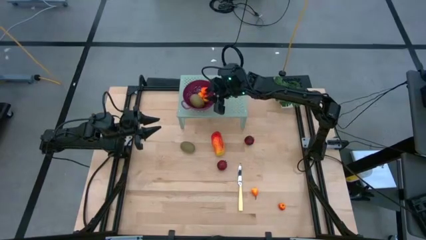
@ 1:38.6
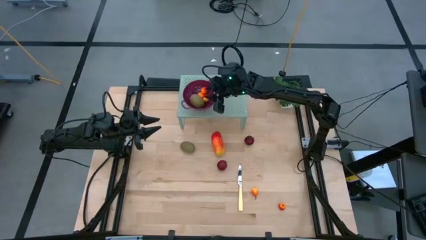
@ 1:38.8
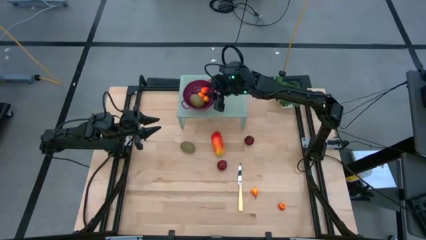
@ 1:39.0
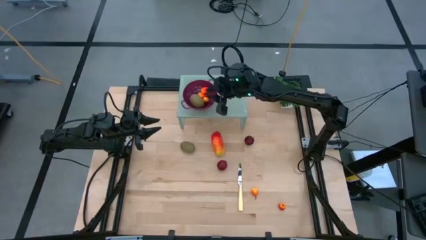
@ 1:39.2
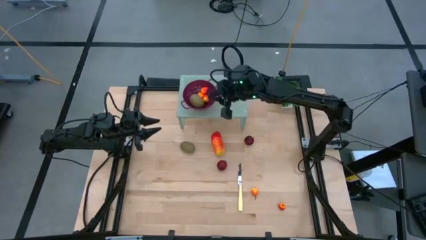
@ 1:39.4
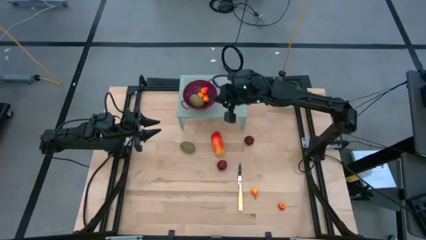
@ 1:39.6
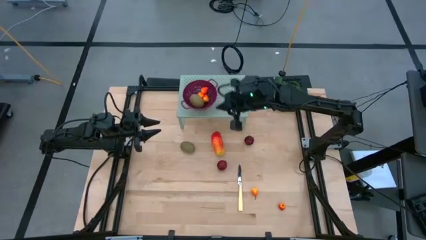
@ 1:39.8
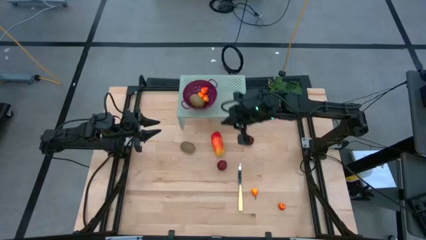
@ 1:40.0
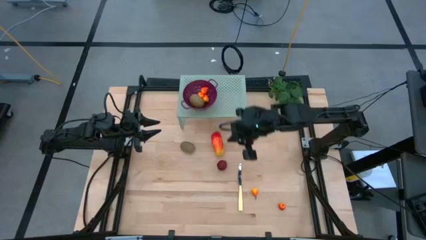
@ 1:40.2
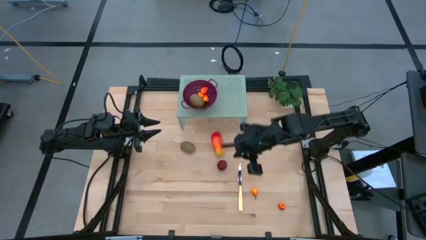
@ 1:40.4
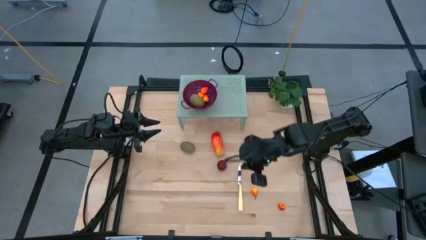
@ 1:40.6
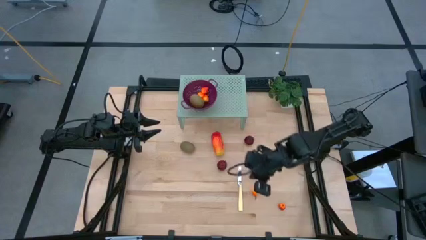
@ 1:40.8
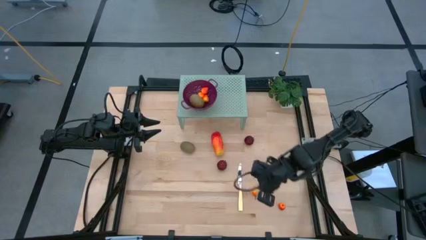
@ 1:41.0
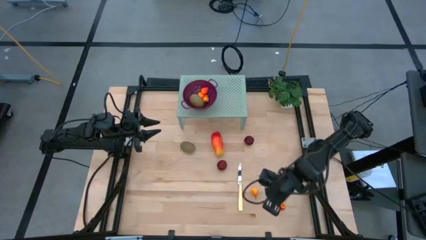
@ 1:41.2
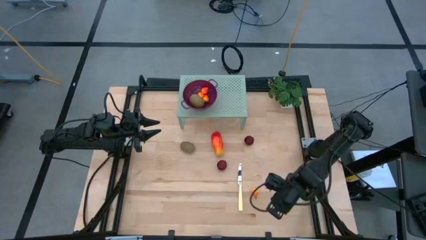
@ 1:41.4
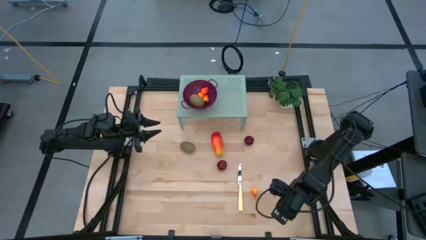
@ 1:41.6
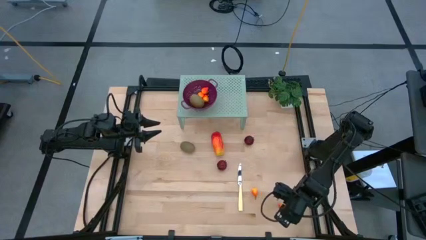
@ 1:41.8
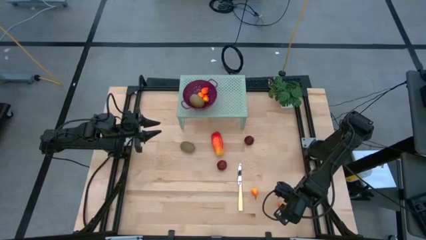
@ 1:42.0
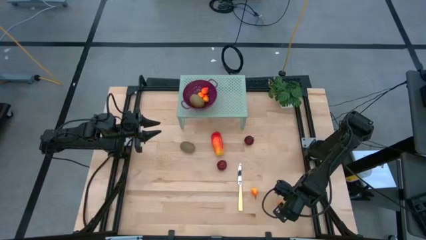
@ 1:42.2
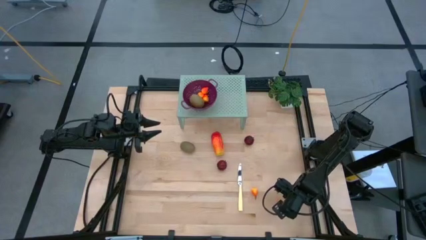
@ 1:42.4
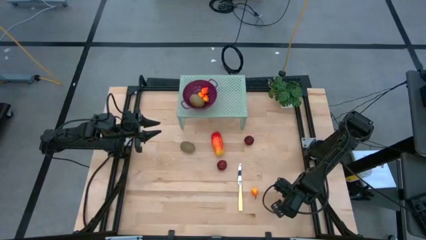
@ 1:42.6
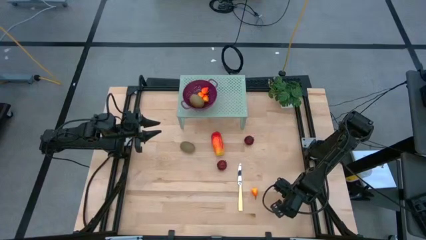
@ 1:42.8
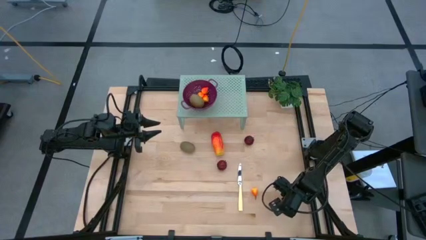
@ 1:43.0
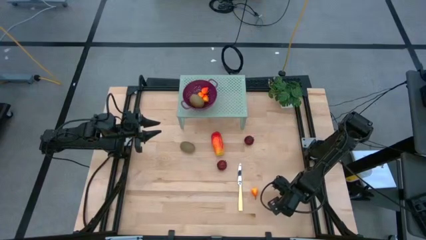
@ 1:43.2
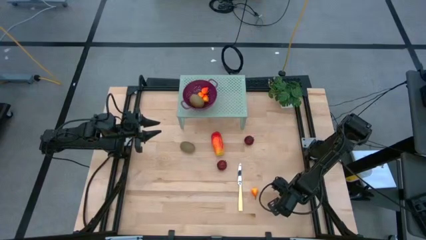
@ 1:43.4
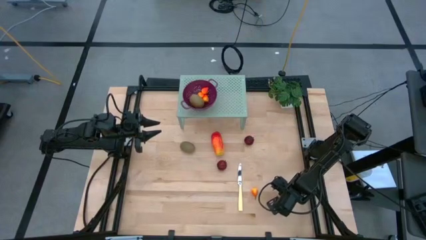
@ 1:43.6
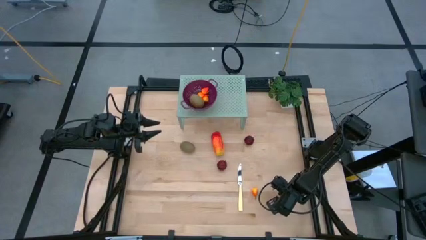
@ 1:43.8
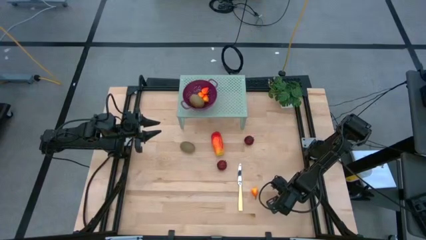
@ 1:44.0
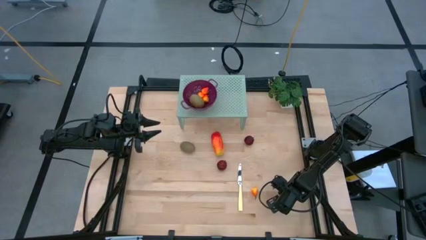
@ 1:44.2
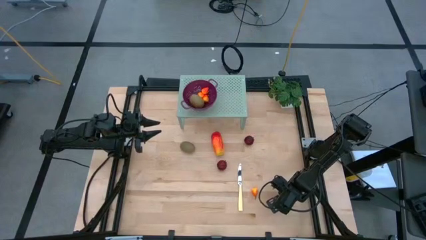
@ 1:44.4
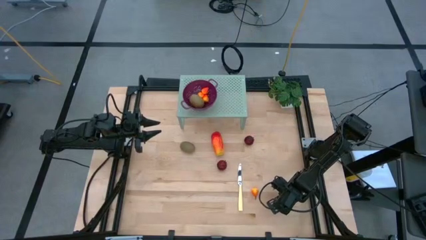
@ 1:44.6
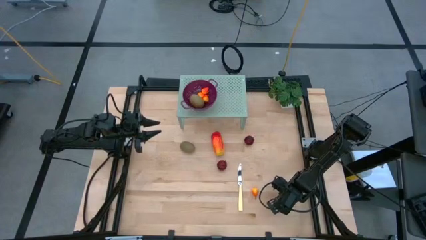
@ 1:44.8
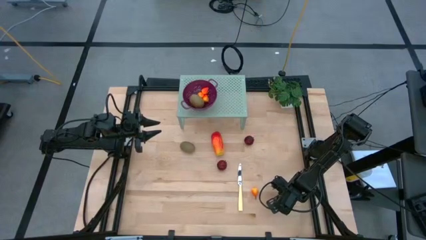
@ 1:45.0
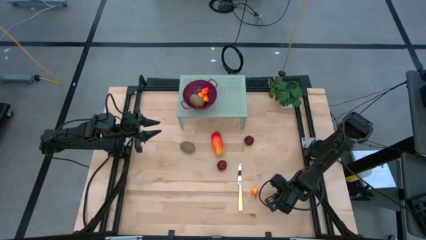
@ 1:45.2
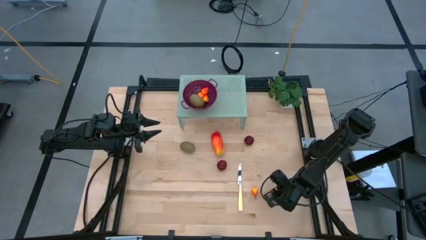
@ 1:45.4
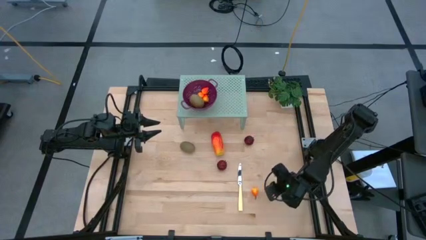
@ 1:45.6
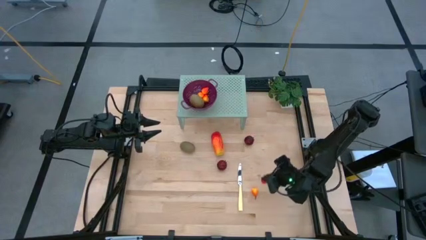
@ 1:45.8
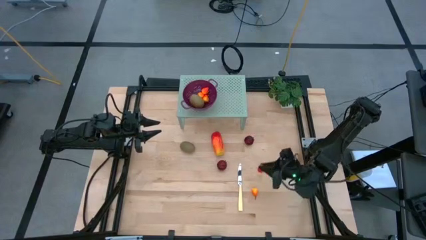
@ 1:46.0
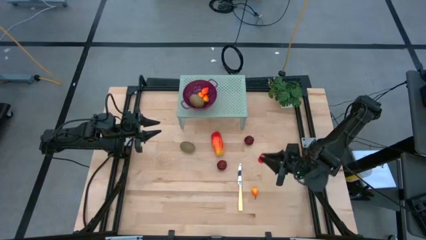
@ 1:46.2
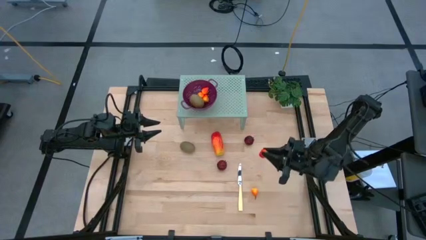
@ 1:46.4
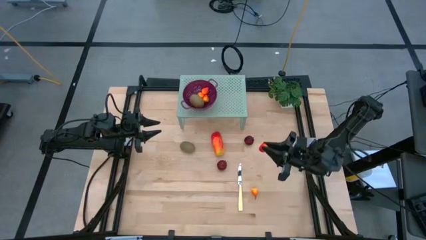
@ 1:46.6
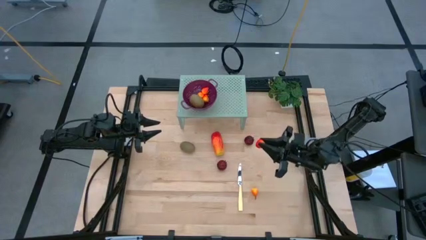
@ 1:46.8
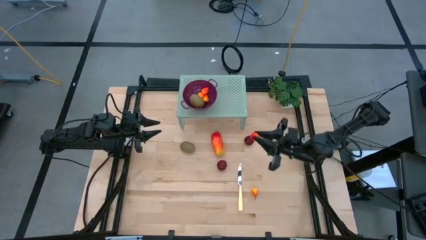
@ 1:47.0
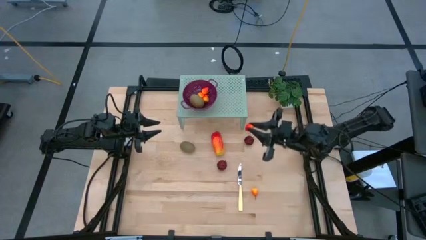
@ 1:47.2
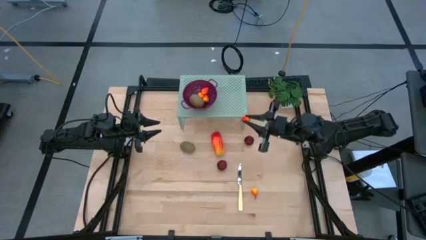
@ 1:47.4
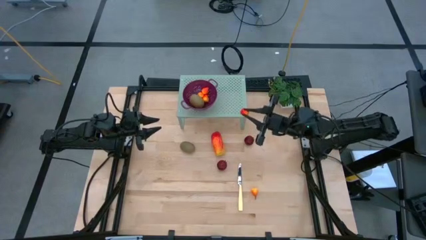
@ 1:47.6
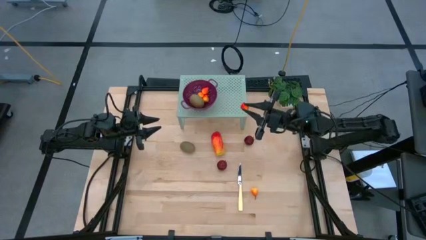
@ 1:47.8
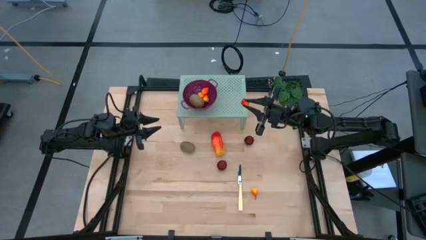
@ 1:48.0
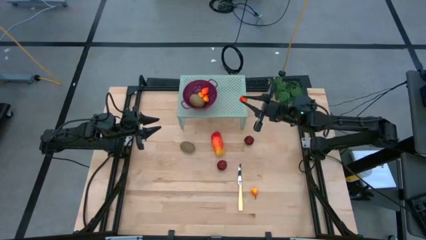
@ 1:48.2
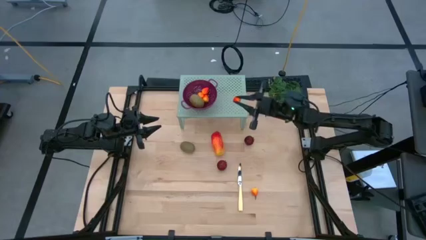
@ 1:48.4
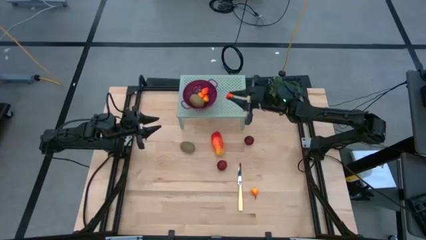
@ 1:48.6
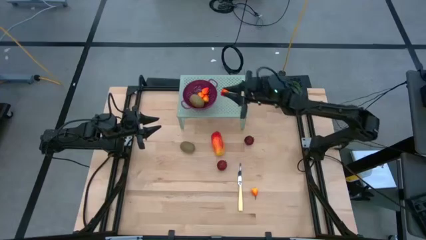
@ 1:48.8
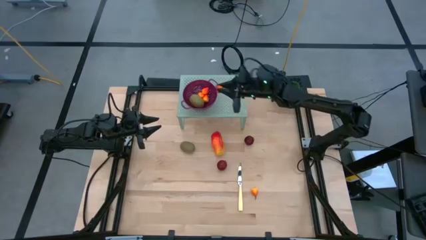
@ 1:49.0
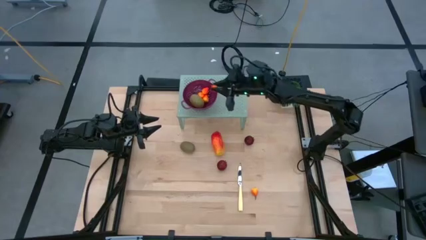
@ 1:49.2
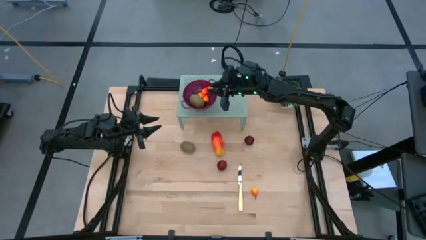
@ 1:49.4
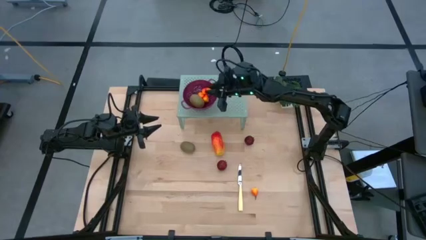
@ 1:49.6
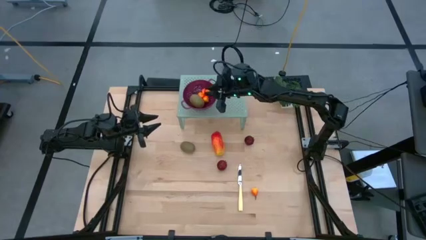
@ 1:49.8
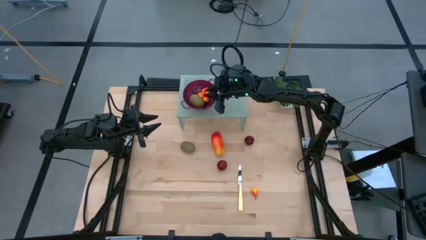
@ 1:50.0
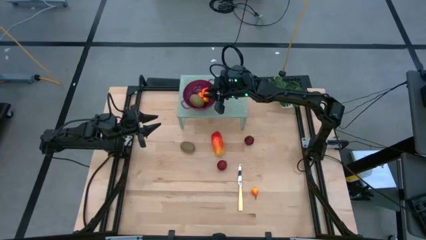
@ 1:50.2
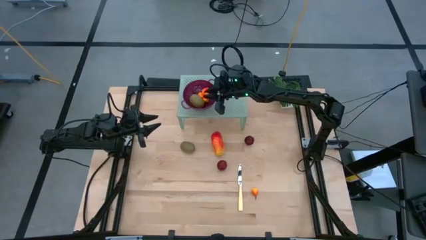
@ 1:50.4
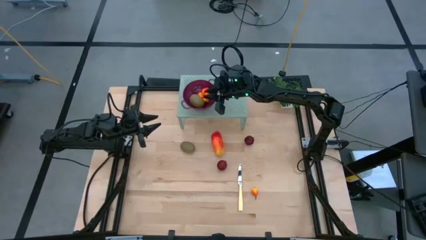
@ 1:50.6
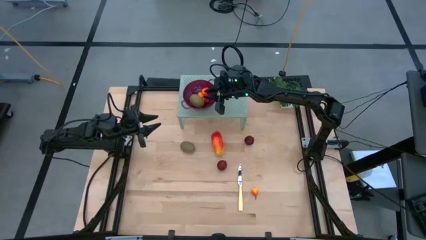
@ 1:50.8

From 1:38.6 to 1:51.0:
Task: Pick & Place Fruit
Put the peach into violet strainer bowl on the shelf
